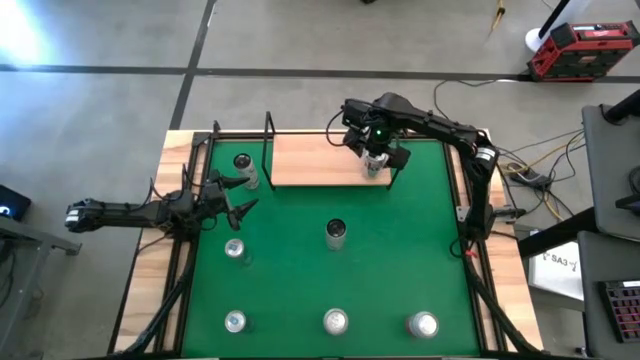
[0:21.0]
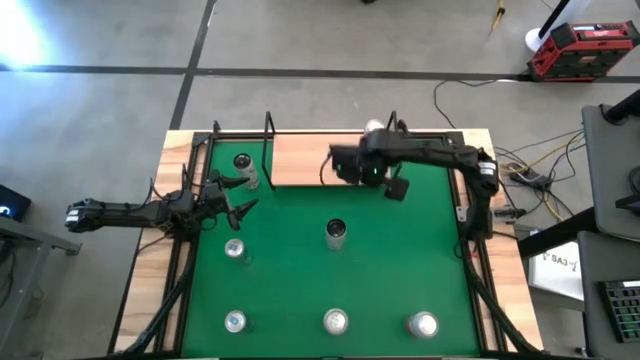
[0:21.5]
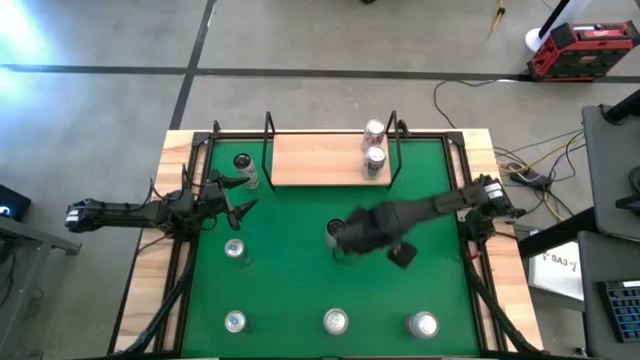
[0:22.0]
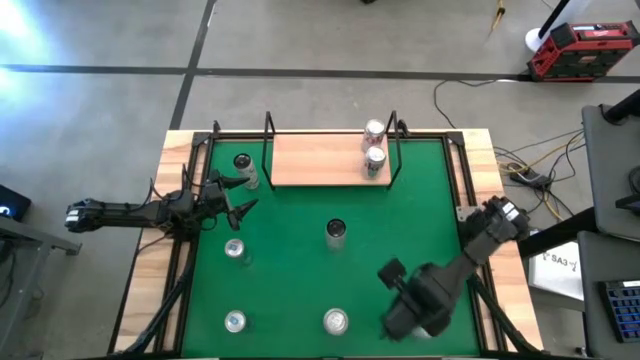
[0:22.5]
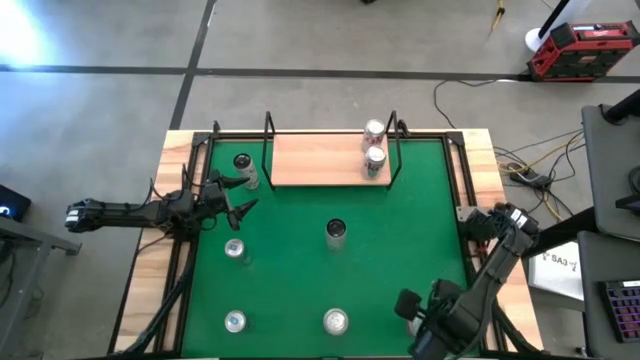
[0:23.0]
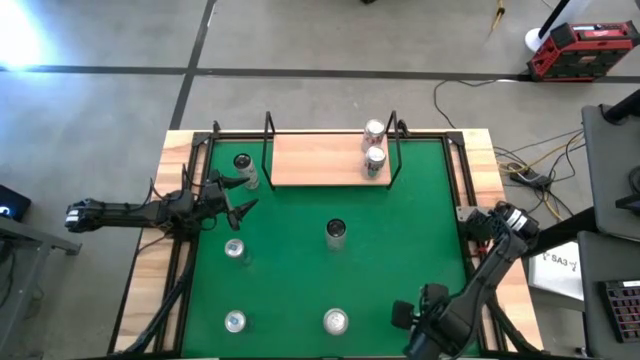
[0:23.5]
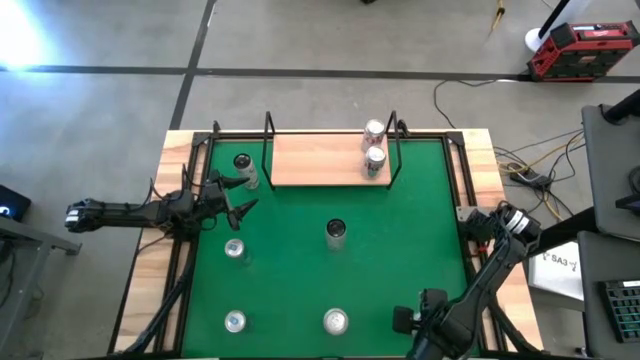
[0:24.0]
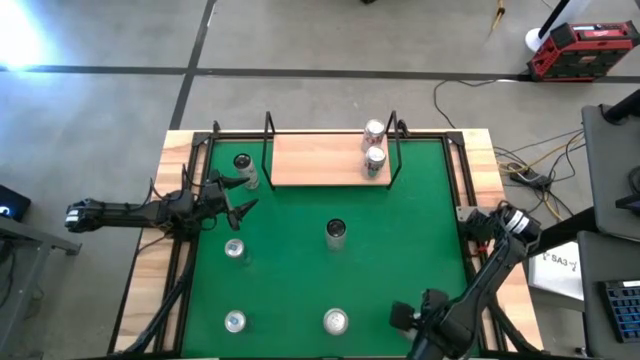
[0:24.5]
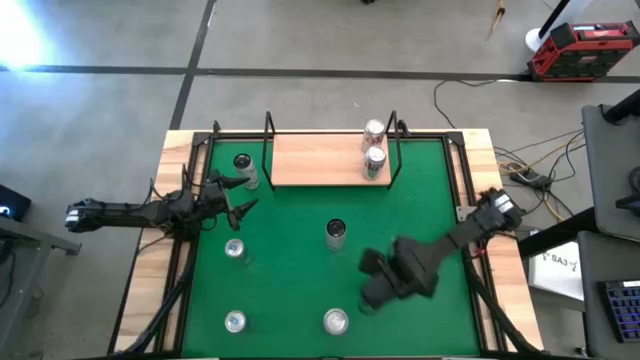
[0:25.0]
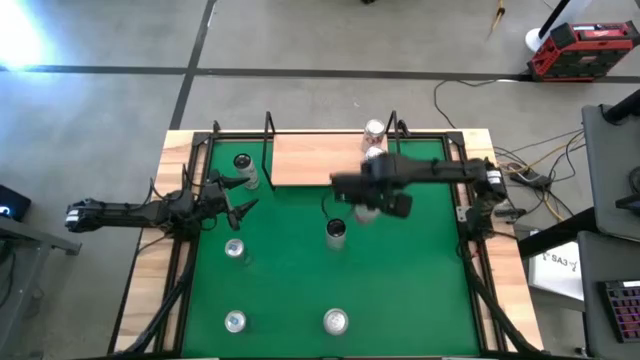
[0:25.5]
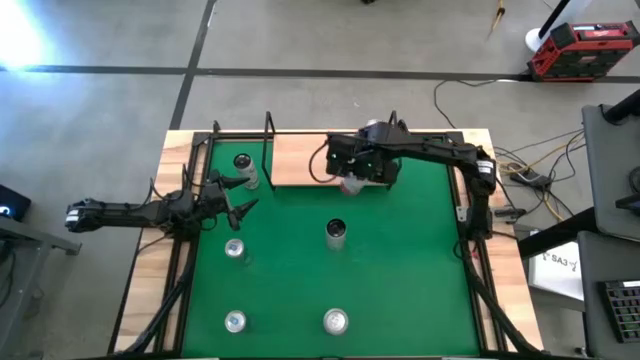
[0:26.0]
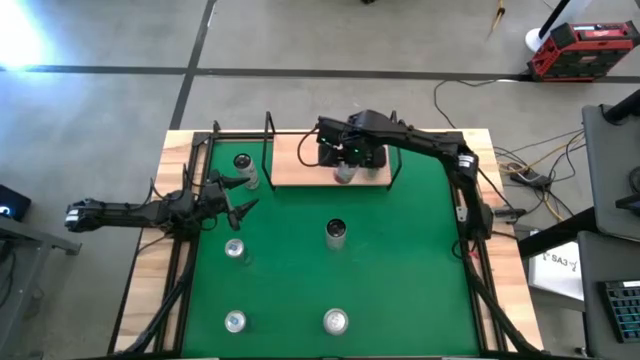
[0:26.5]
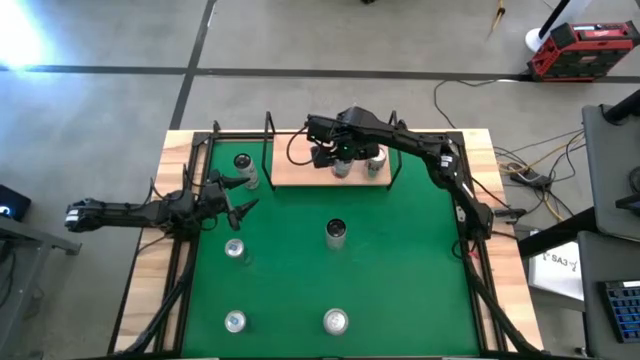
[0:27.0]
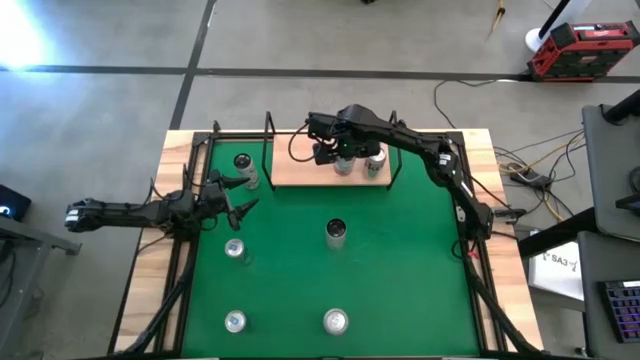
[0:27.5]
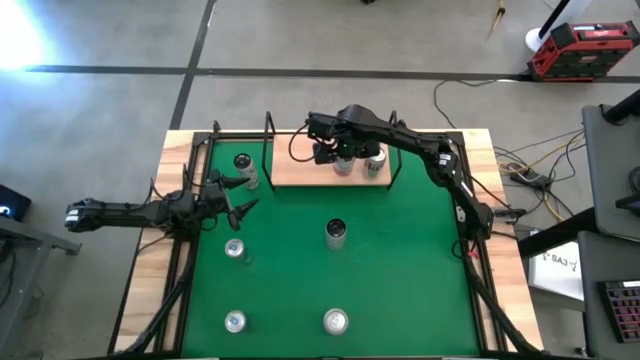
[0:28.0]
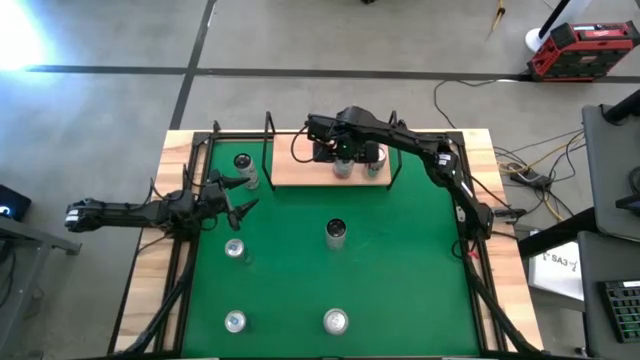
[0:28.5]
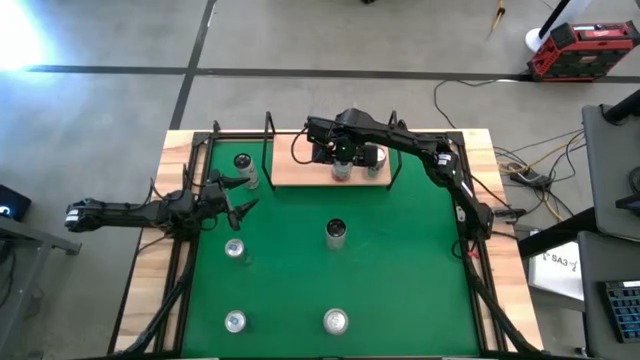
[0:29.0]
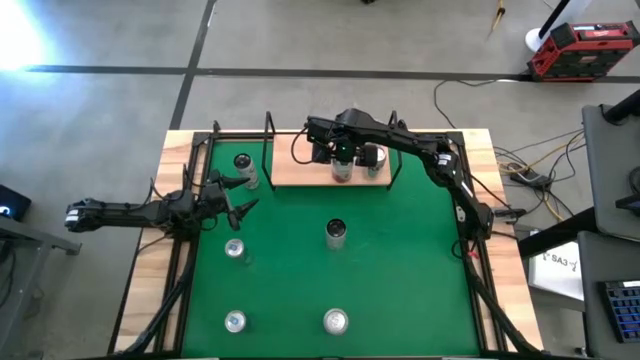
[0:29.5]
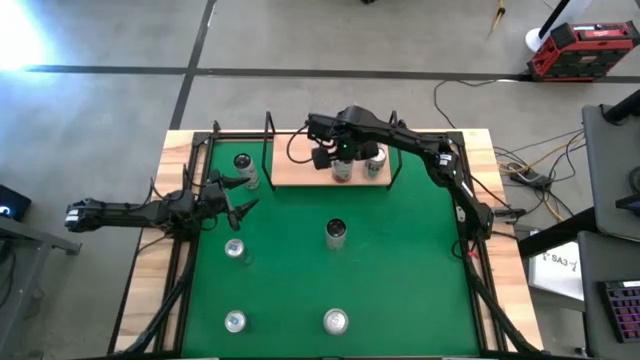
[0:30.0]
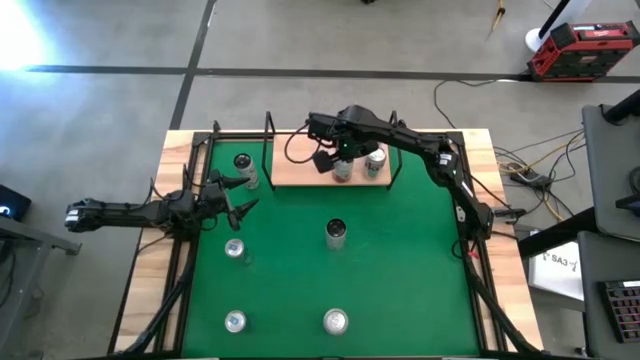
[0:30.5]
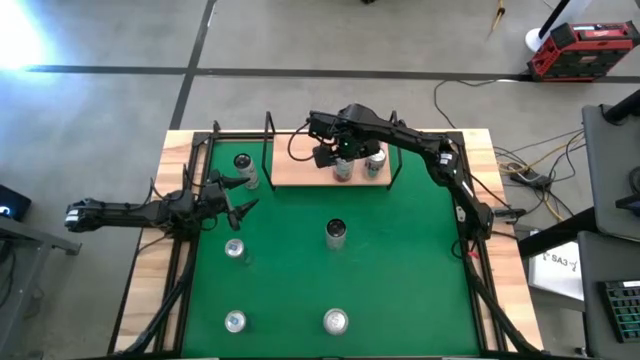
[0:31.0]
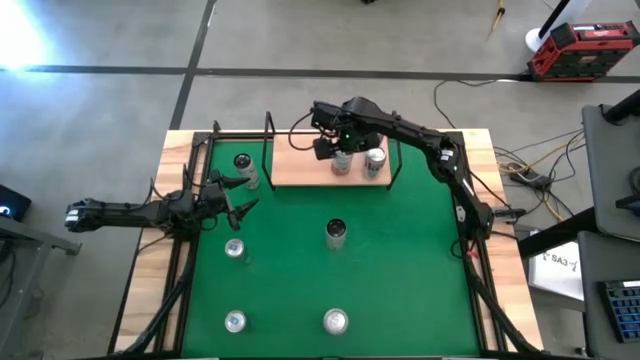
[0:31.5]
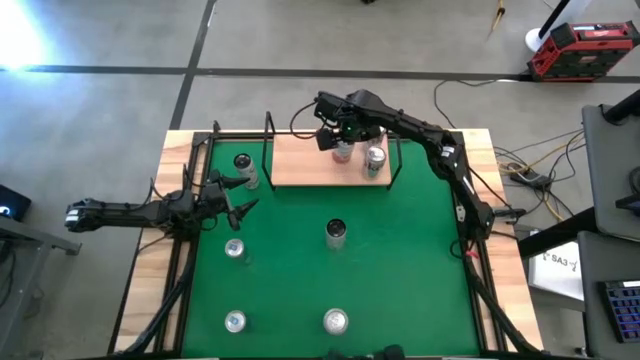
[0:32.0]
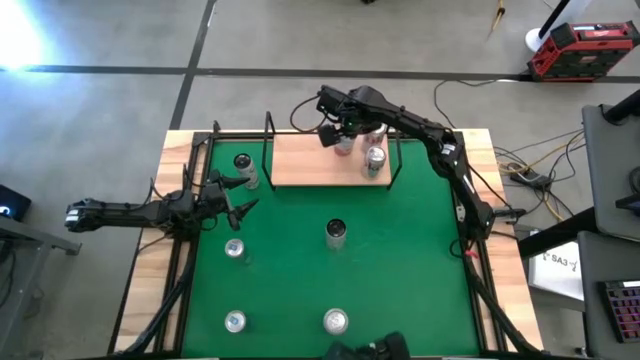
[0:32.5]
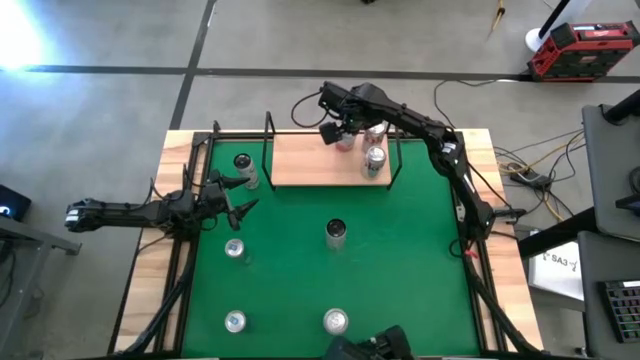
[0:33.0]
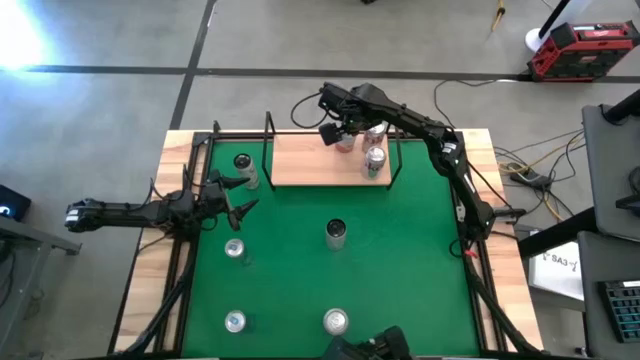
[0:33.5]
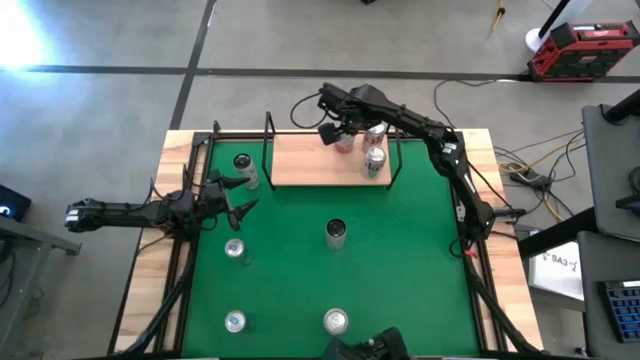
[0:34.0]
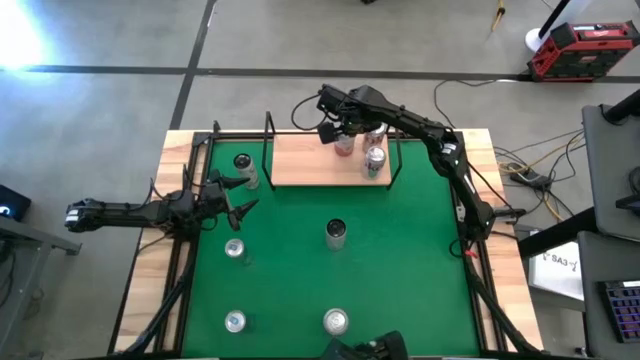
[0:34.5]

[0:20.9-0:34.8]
Task: Place canned beverage on shelf
Put the right white and orange soda can on the shelf

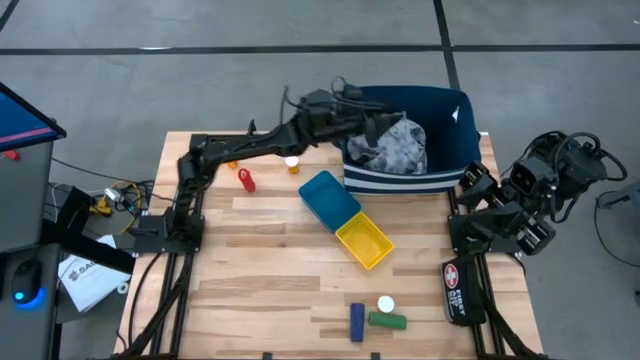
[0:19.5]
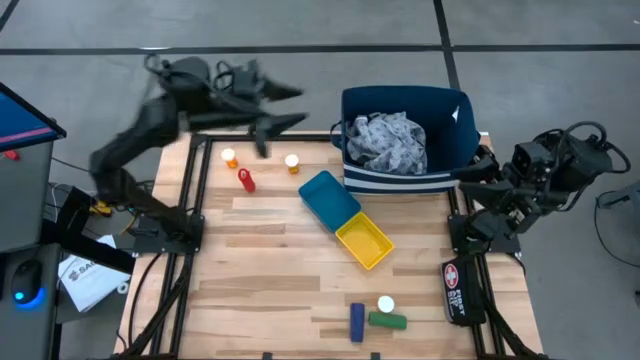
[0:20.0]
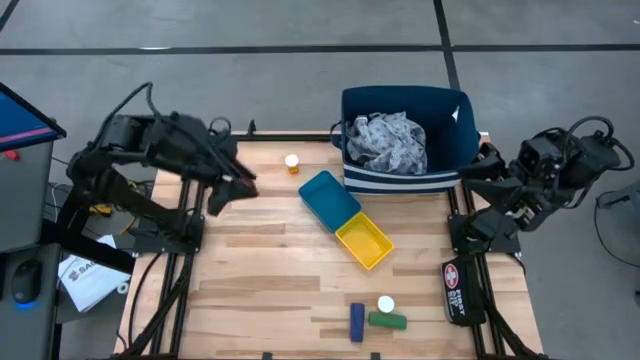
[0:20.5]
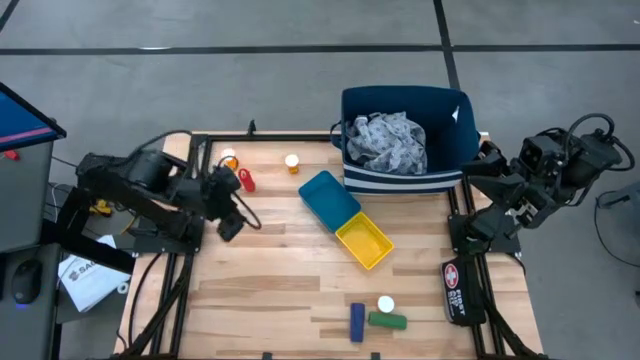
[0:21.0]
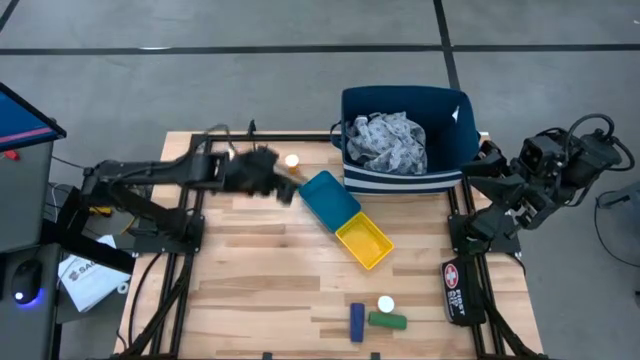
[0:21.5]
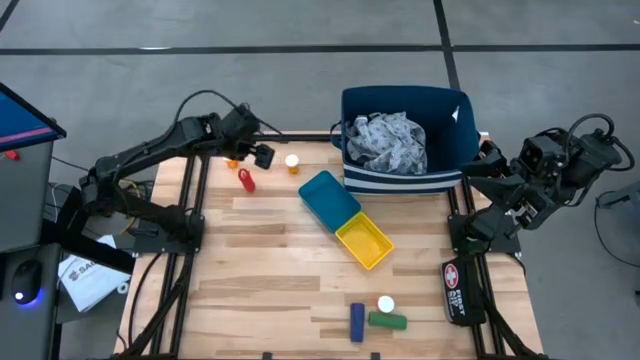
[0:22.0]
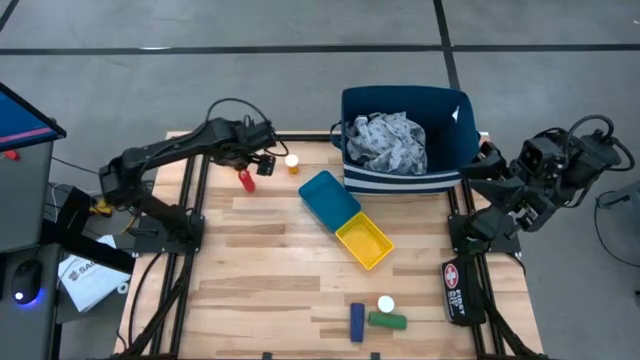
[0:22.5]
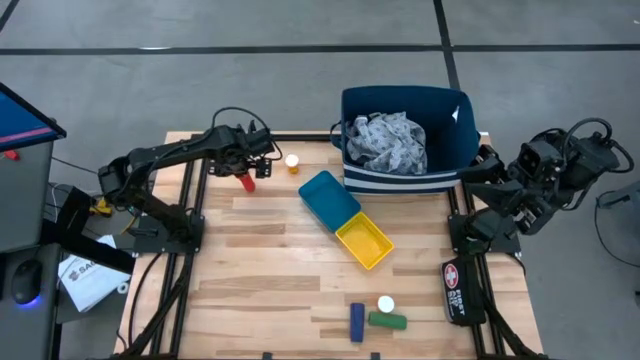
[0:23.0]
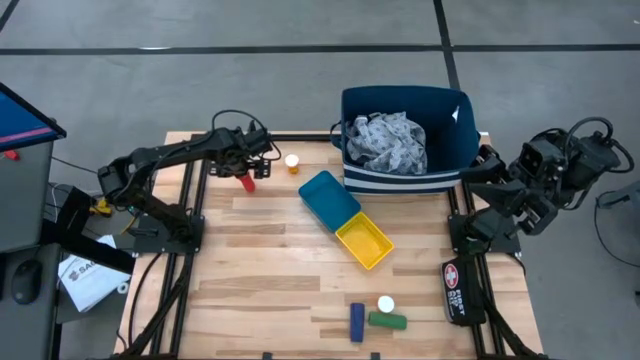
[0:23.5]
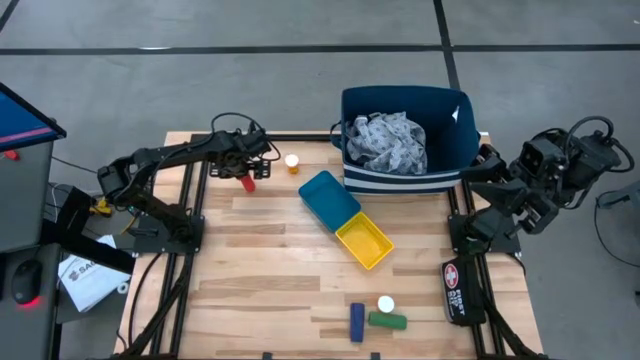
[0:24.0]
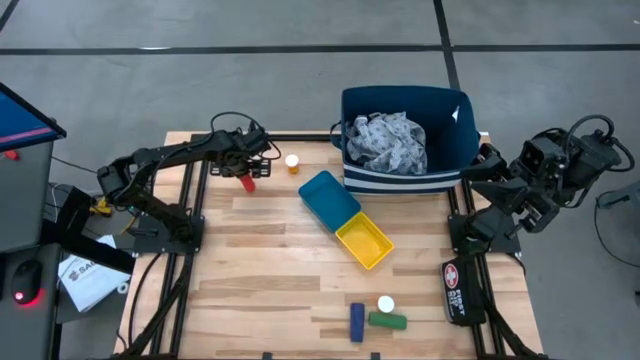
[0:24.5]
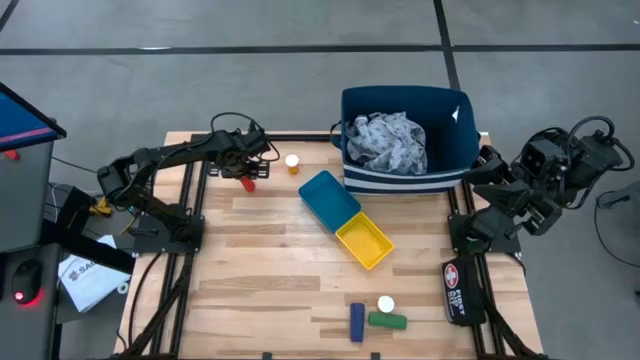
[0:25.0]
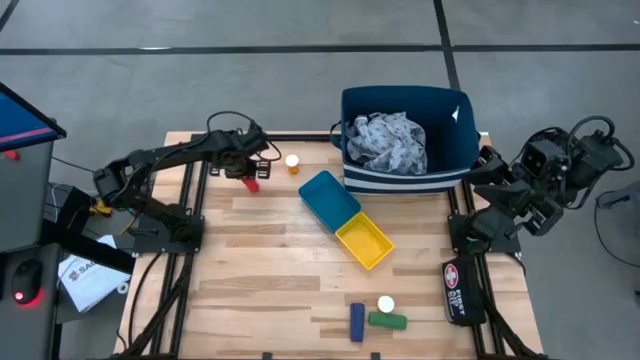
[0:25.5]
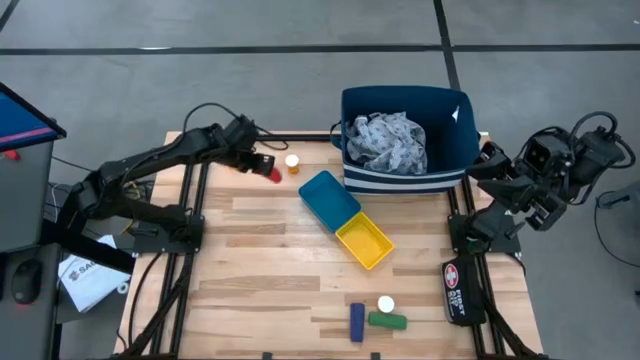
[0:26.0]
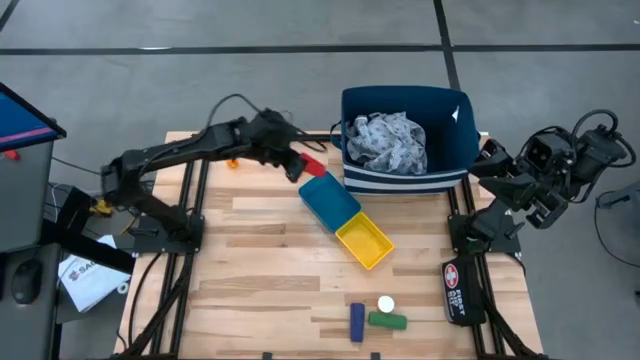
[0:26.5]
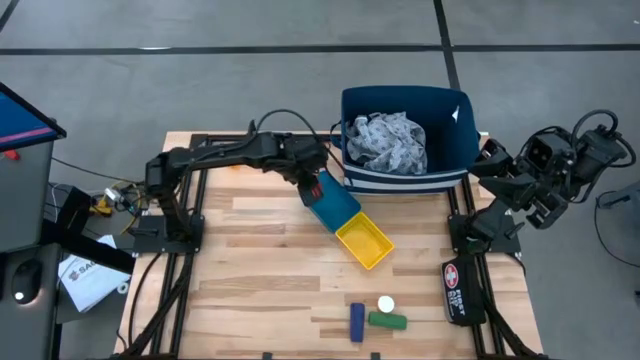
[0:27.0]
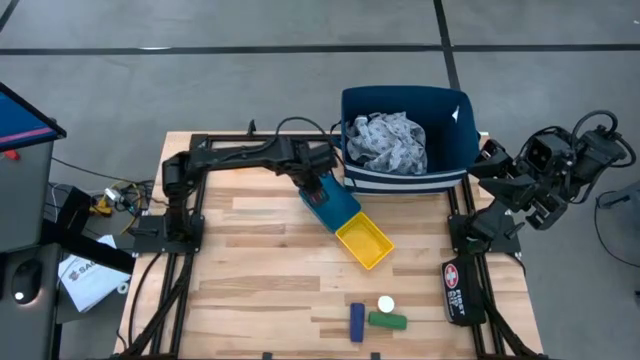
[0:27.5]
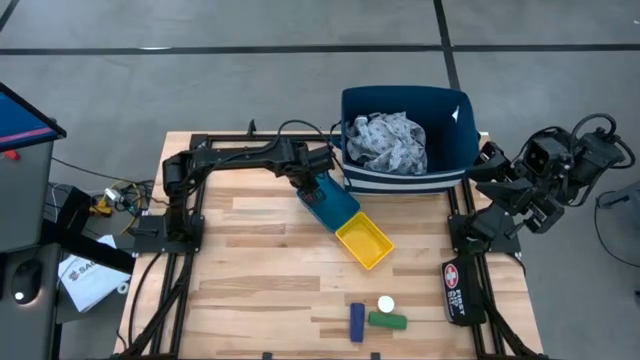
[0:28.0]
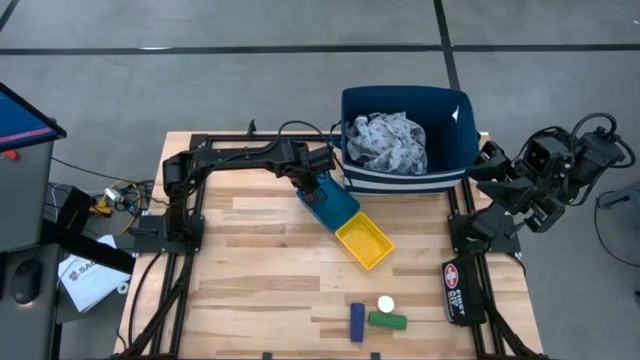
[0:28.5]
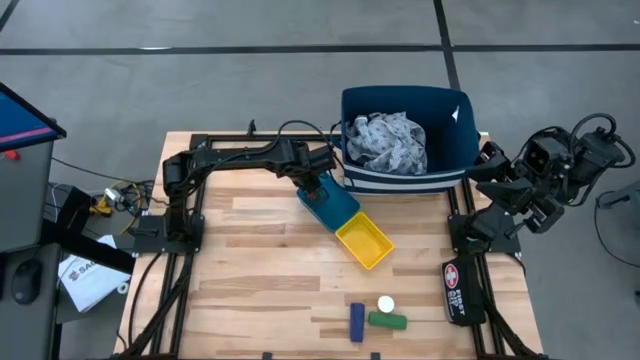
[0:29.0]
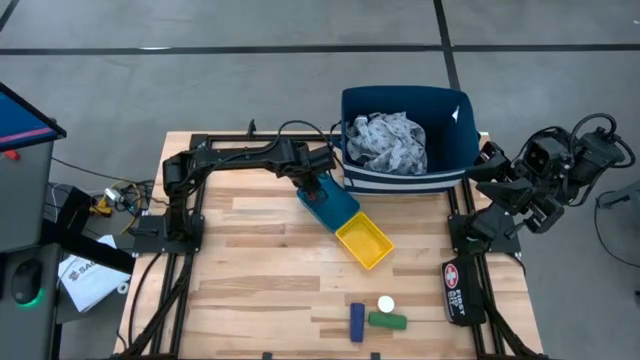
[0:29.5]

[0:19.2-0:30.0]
Task: Pick & Place Medicine items
Put the red bandage into the blue bin
